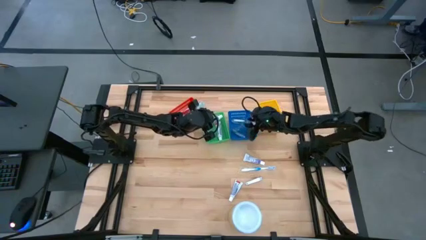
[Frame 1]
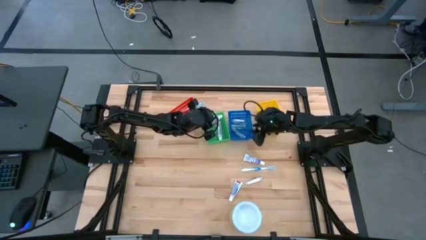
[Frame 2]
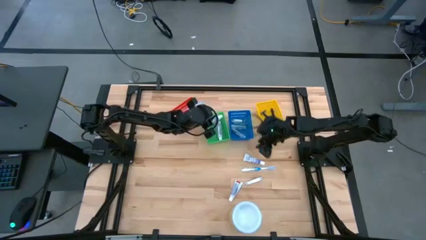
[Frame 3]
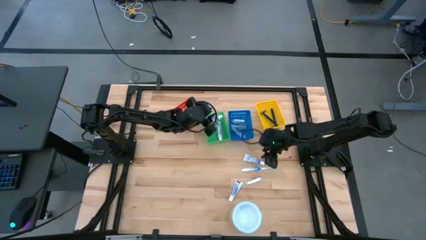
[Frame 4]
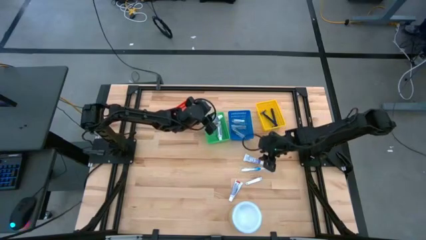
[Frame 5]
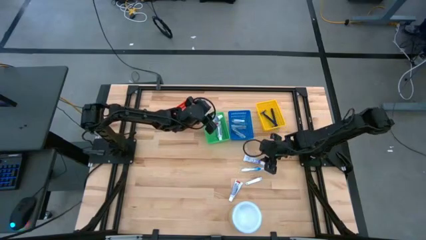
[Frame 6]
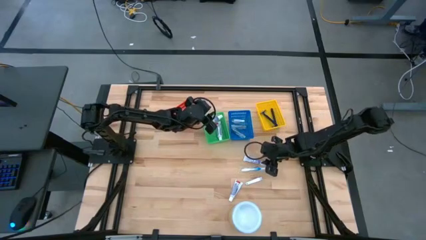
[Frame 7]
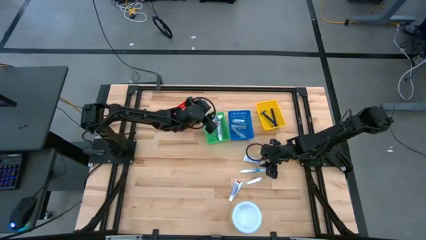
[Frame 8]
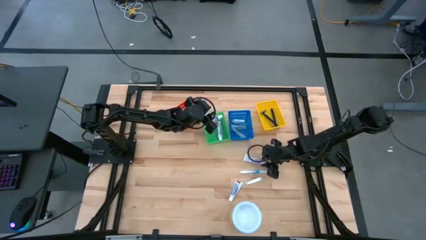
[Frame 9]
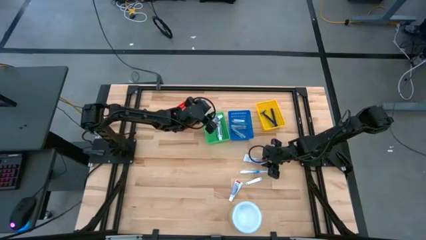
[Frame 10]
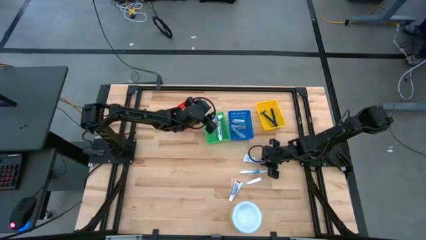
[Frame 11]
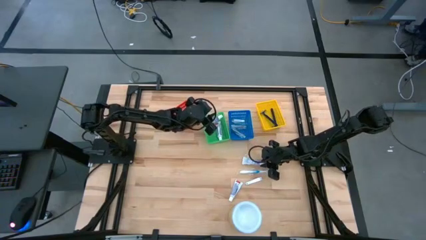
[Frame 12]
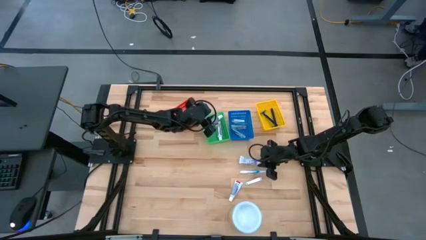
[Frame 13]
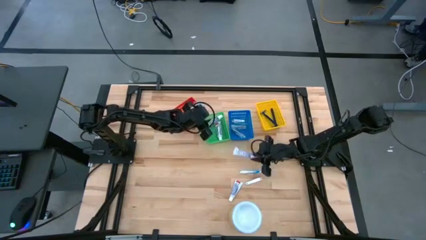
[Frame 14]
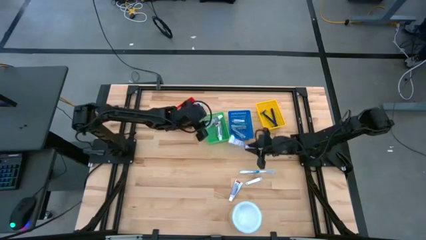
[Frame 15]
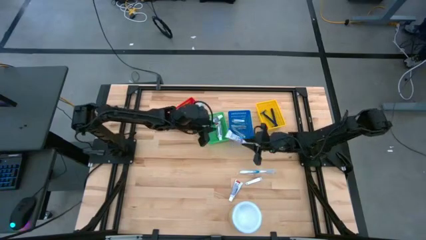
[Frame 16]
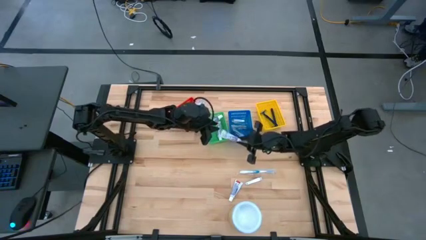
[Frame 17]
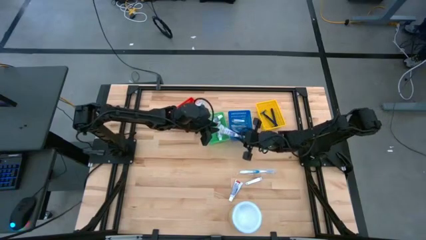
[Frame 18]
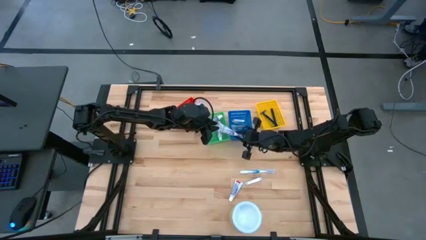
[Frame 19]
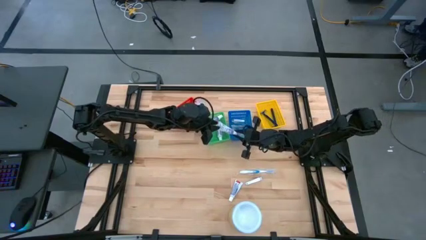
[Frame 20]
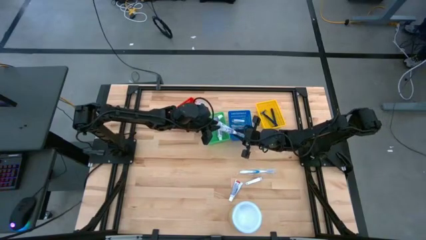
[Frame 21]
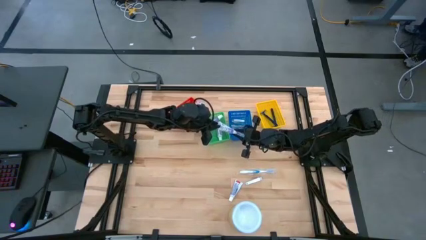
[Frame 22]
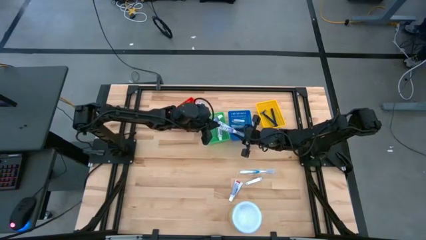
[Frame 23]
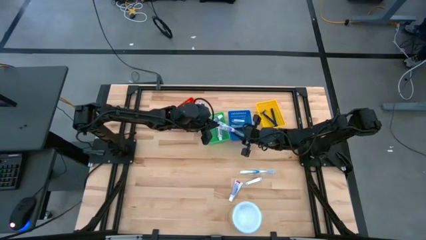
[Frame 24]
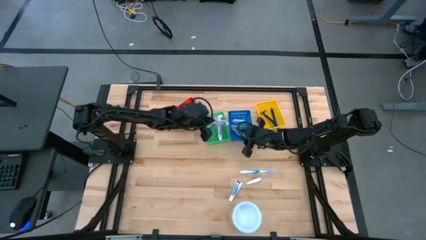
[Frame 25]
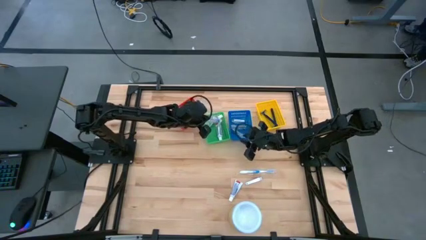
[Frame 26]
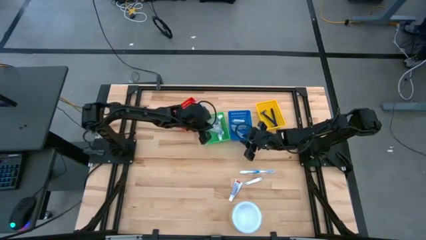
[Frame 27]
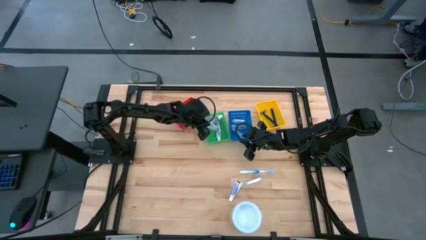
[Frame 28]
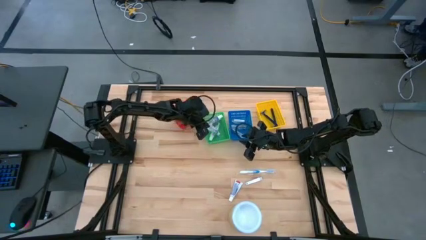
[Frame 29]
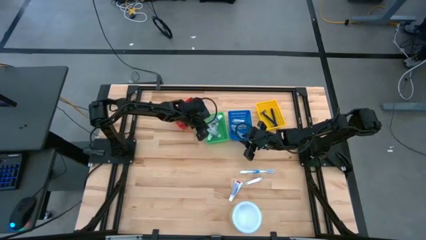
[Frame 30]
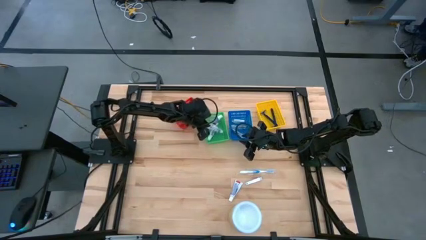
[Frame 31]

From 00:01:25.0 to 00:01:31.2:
Task: Pick & Place Travel size toiletries
Put the white toothpaste into the green bin

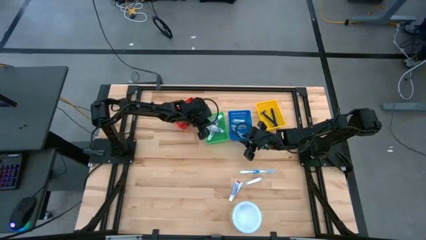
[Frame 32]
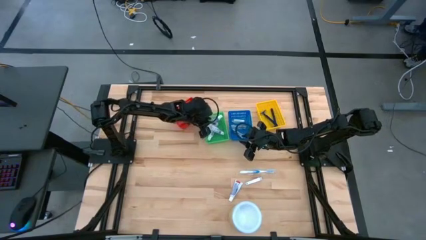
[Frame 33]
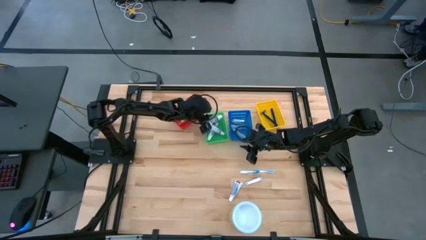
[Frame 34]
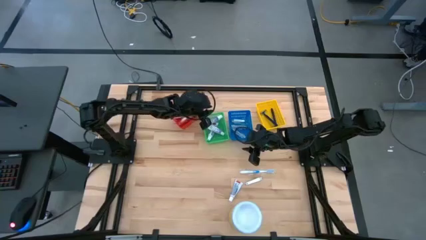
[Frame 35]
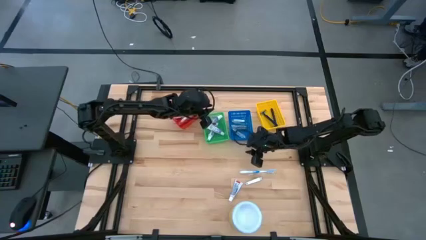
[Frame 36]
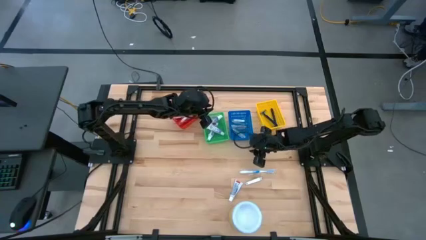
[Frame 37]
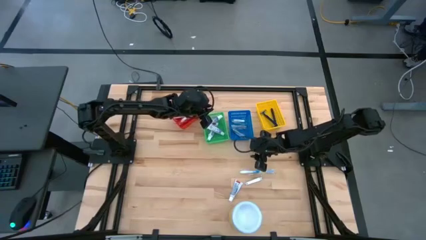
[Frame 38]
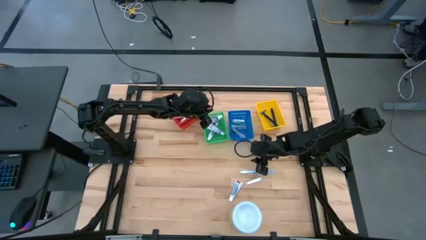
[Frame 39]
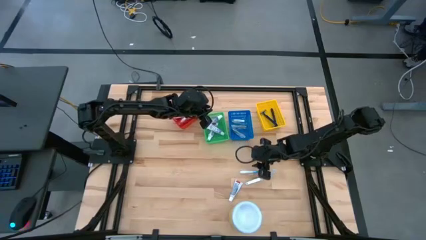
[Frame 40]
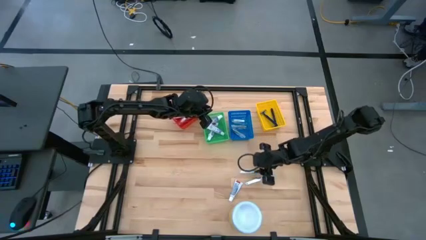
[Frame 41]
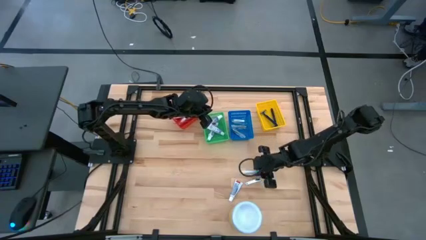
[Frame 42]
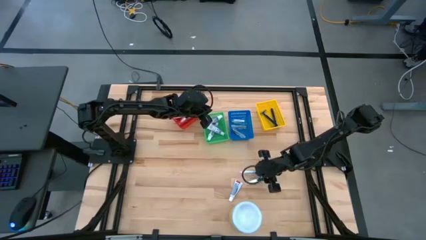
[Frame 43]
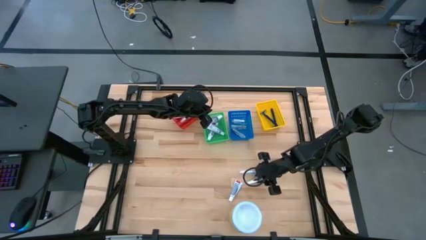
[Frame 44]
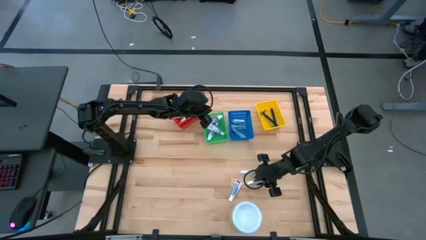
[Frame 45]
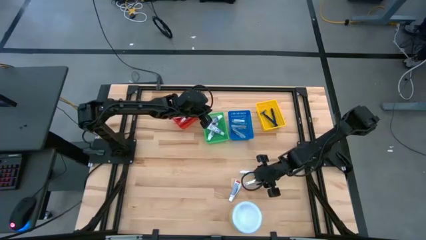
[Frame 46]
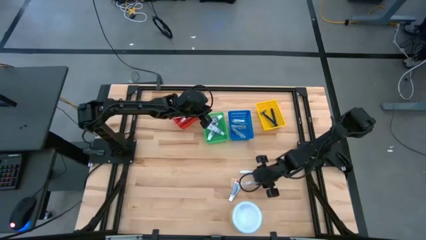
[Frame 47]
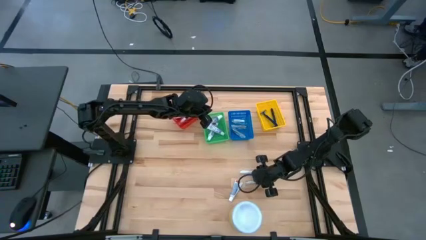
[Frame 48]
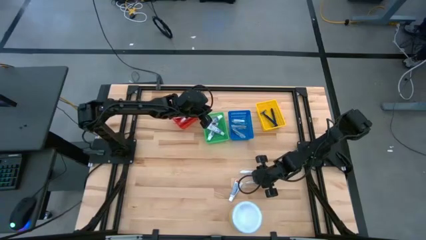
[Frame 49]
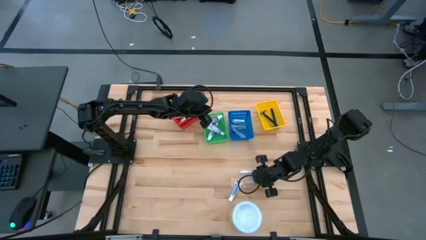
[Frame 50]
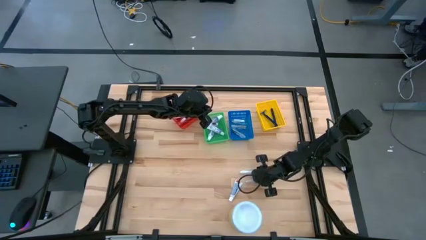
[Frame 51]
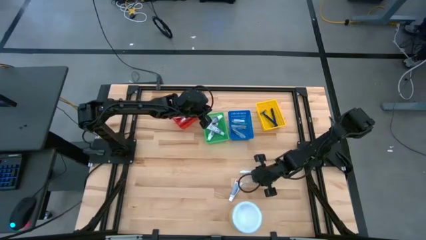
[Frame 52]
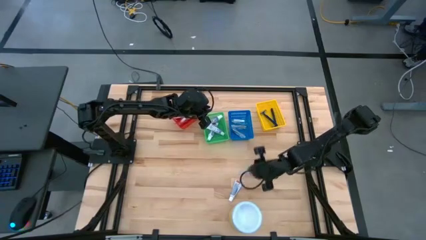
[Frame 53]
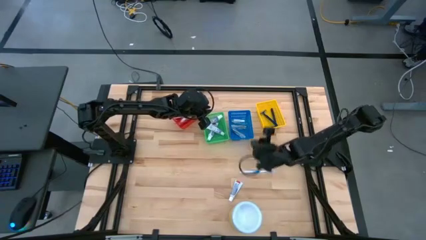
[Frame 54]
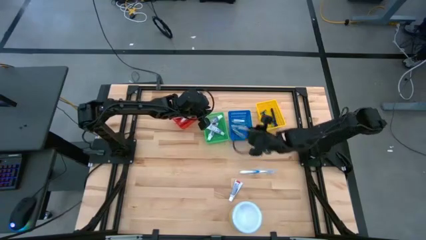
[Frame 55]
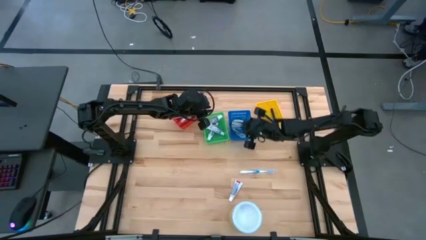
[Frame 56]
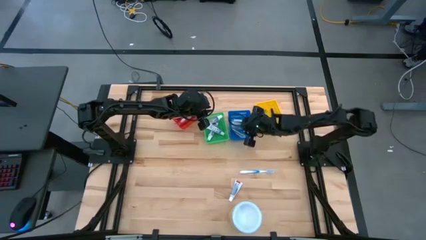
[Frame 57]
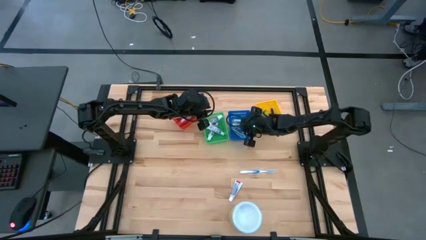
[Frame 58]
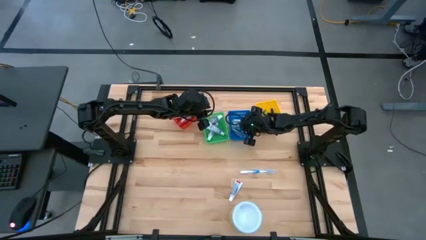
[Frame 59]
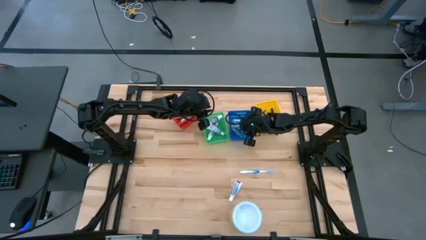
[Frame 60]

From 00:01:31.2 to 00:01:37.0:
Put the silver nail cutter into the blue bin

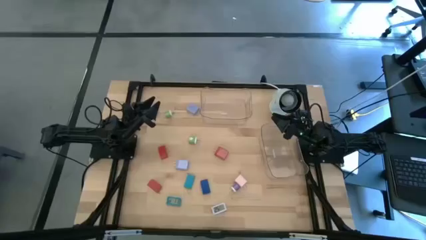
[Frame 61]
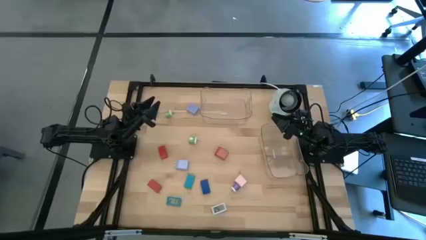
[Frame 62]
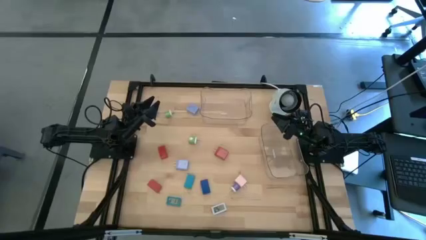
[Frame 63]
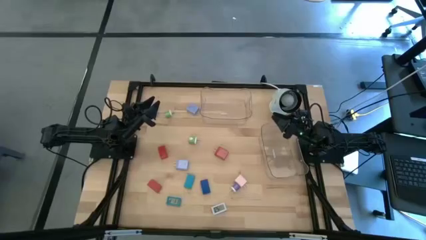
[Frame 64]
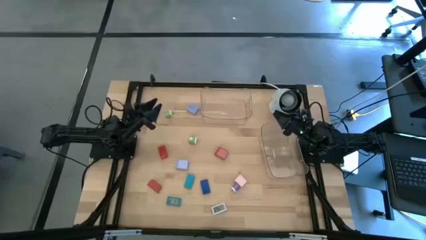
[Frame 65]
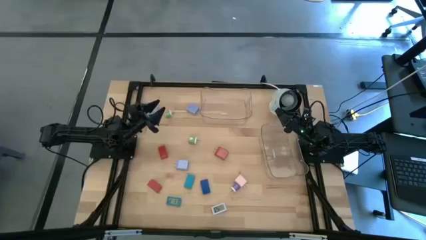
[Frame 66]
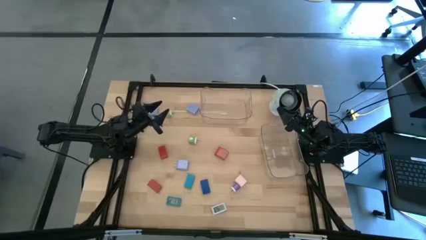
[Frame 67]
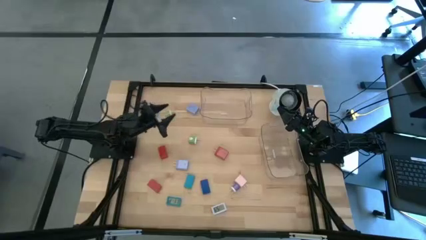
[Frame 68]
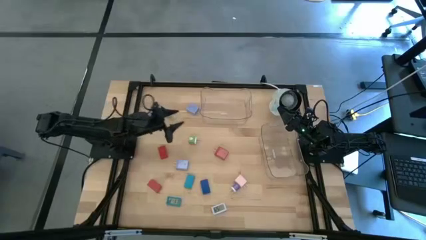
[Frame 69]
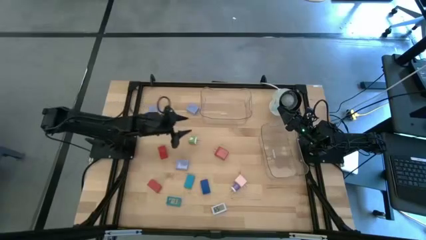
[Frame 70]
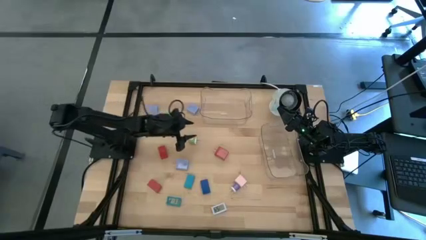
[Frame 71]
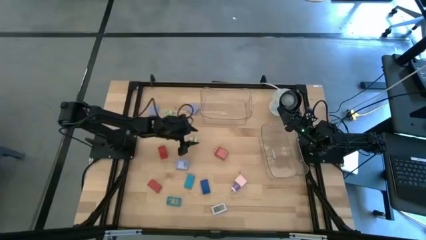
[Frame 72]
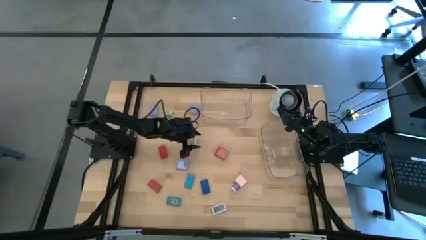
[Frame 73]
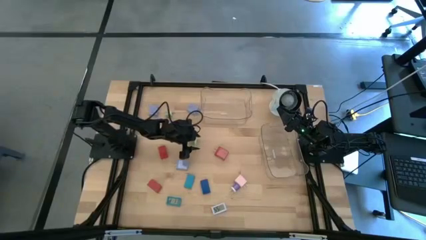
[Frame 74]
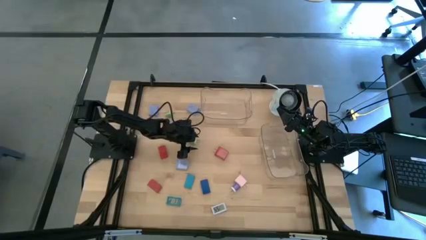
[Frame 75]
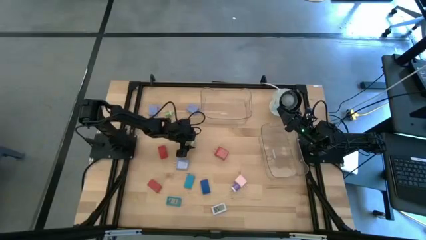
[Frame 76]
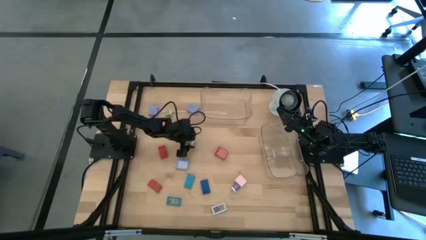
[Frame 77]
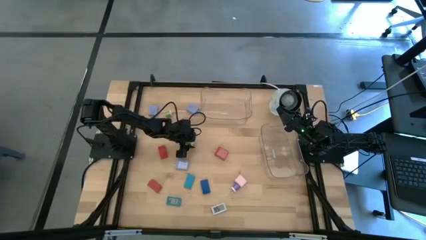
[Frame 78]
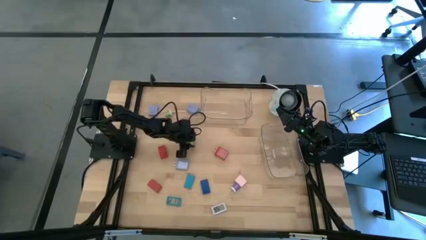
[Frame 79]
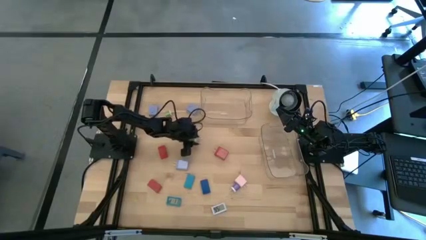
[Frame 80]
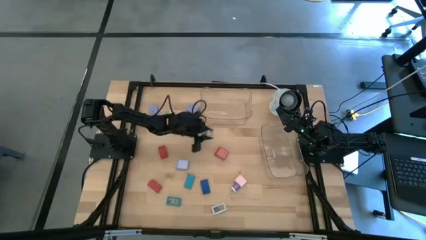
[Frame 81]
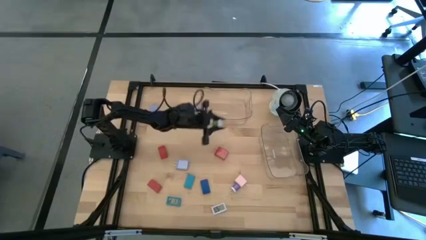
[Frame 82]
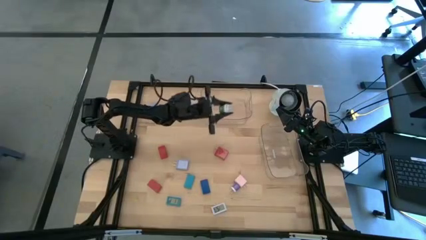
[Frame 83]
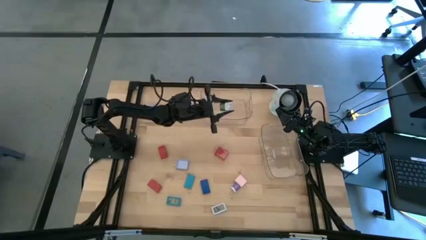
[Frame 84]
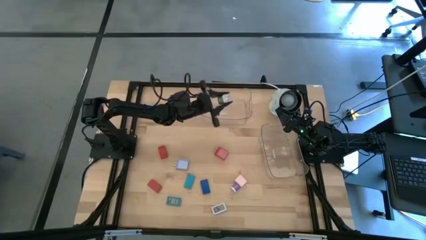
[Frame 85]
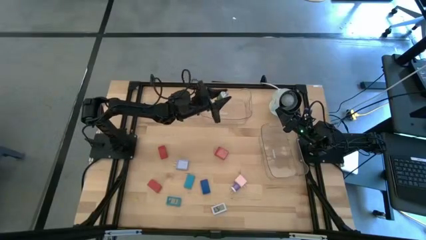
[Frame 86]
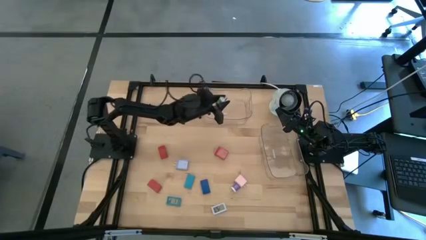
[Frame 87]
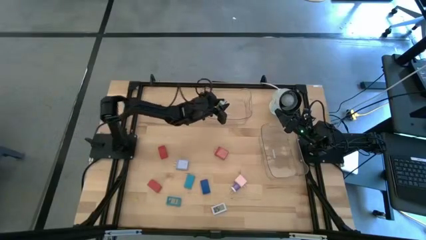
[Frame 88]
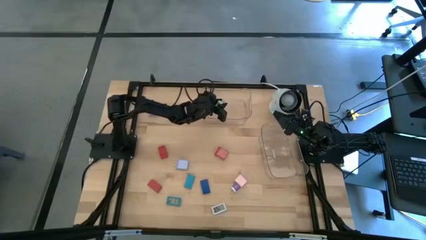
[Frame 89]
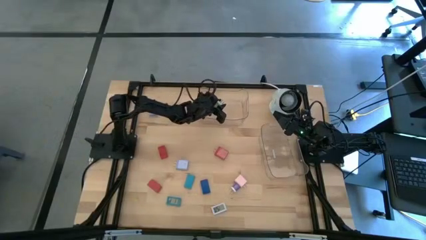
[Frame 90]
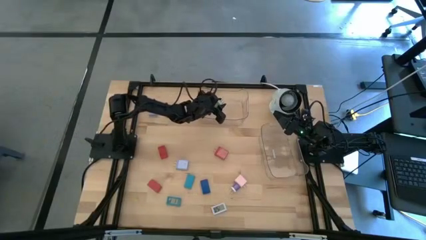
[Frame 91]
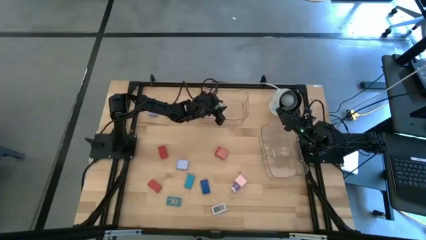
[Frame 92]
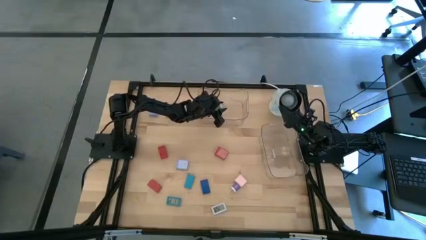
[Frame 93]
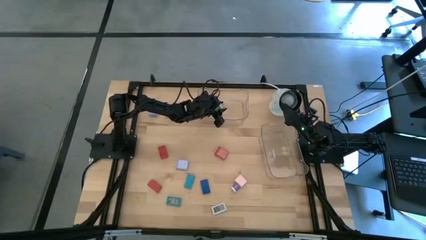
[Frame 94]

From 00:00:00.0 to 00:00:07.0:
Task: Pick & Place Office items
Put the bottom small green charger adapter into the top transparent bin
